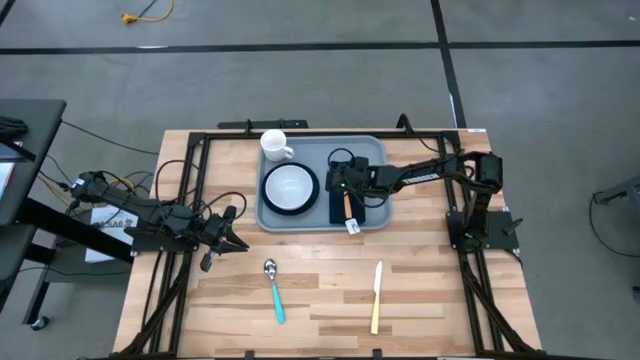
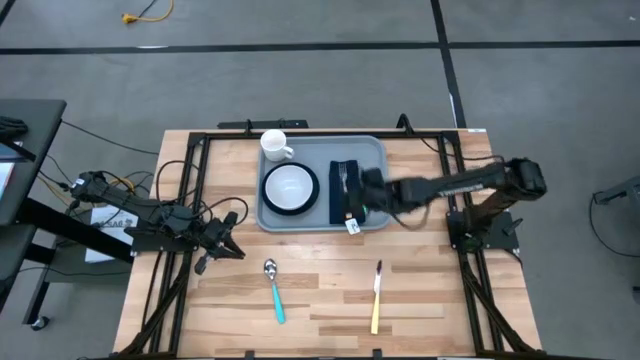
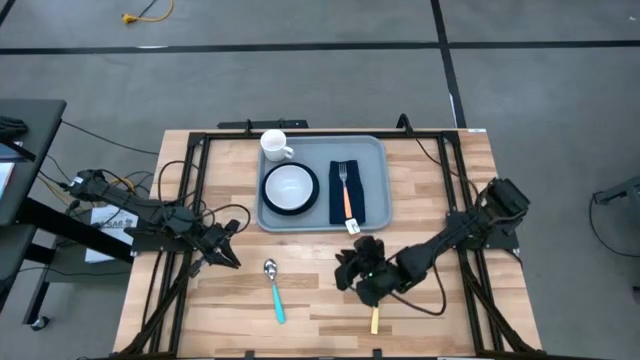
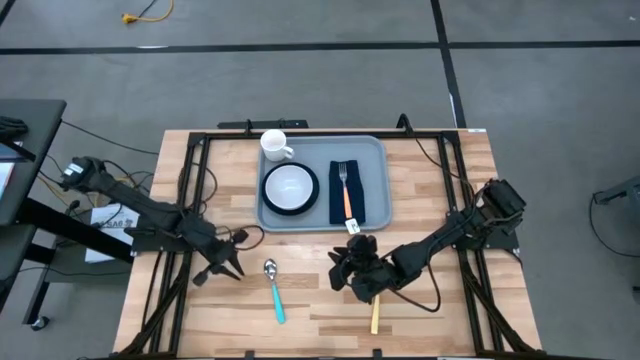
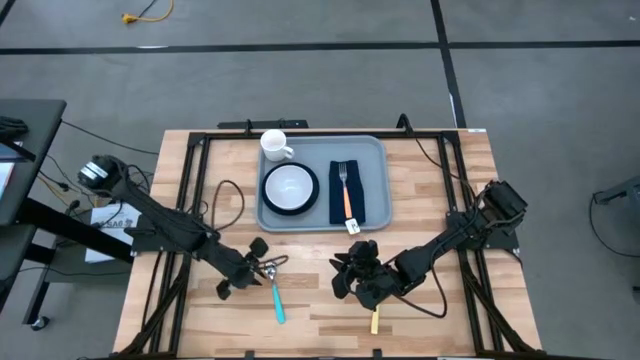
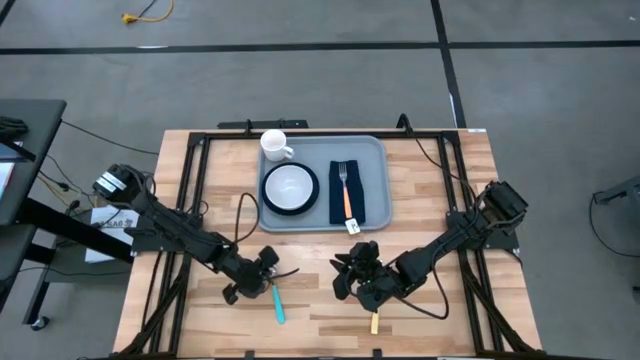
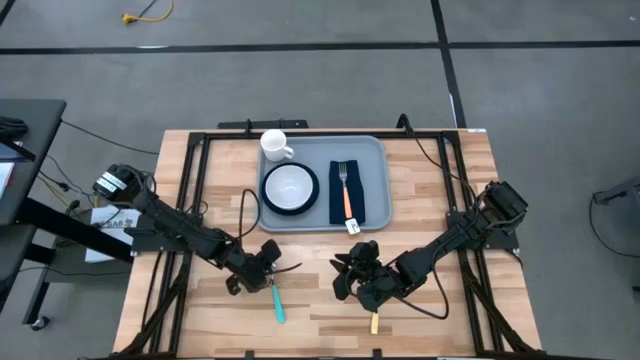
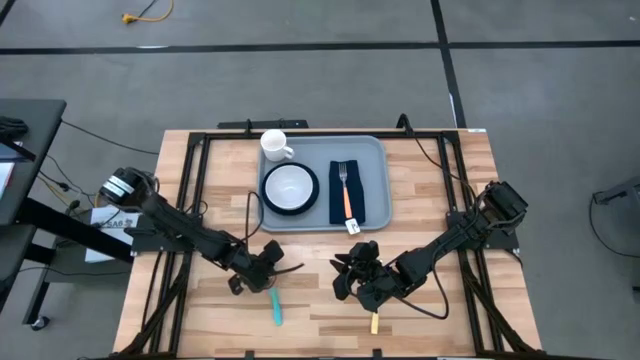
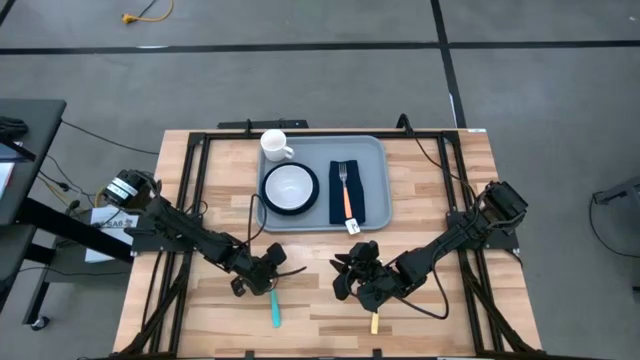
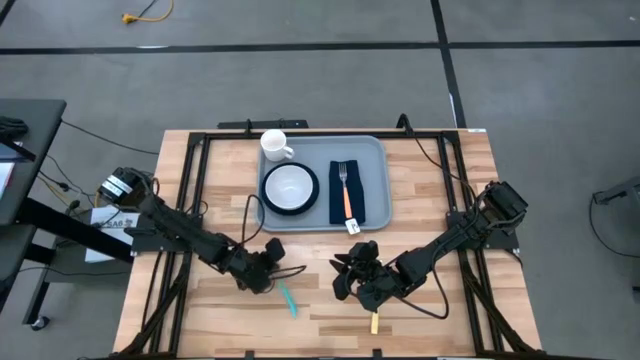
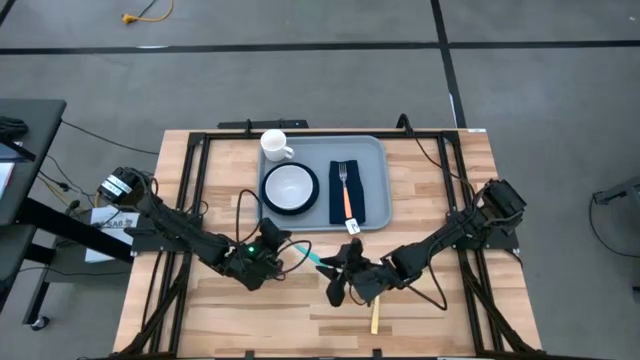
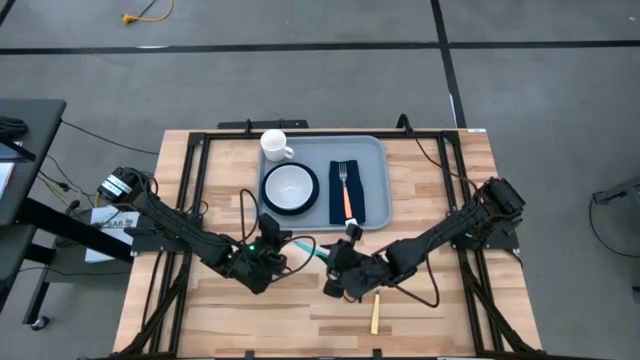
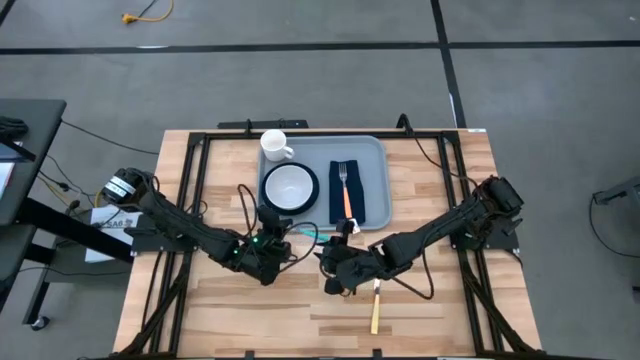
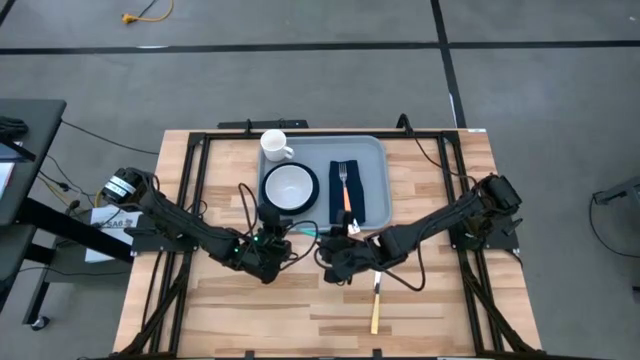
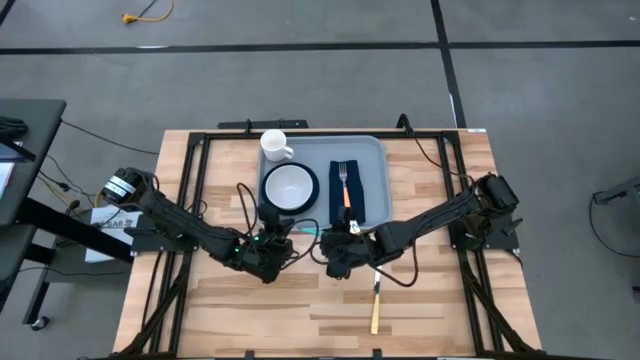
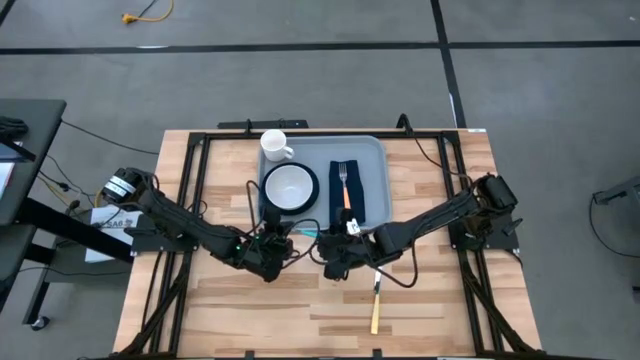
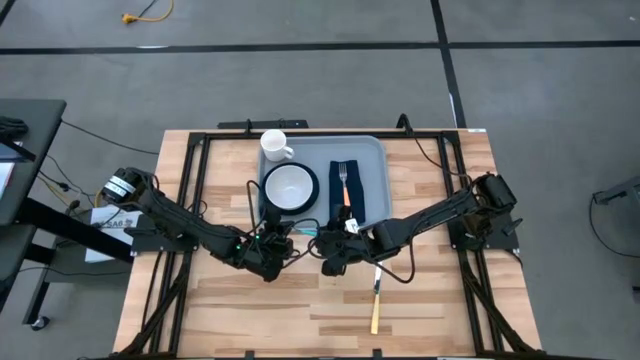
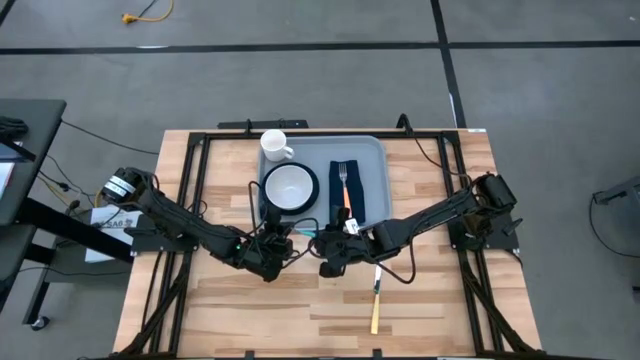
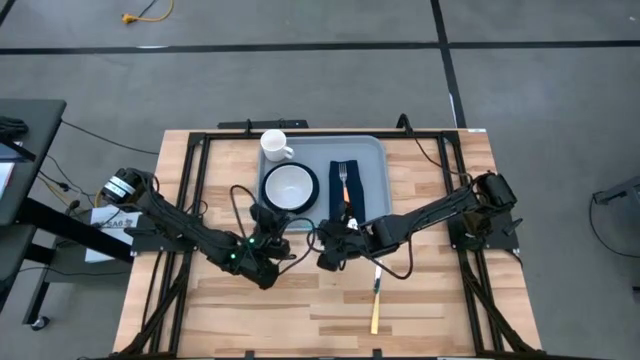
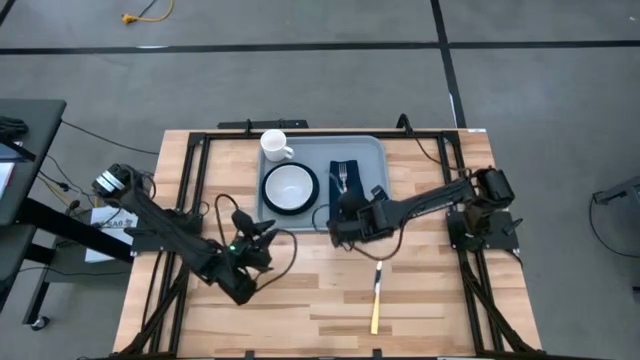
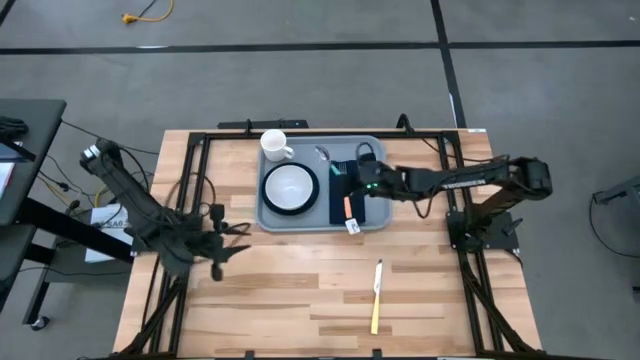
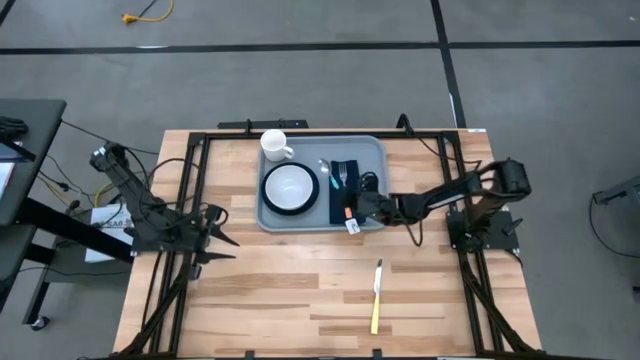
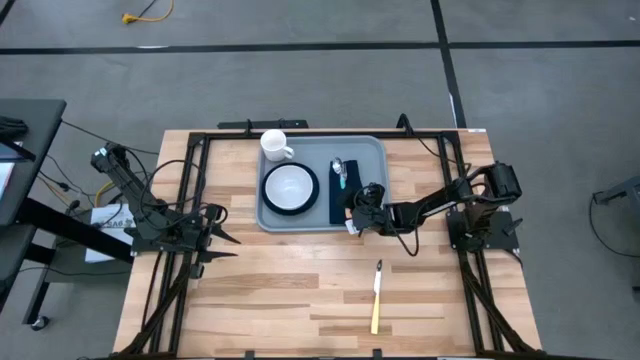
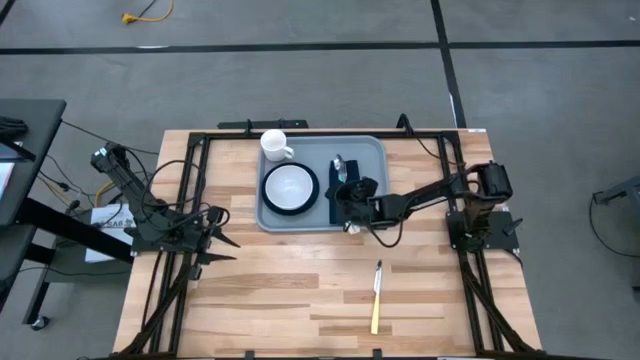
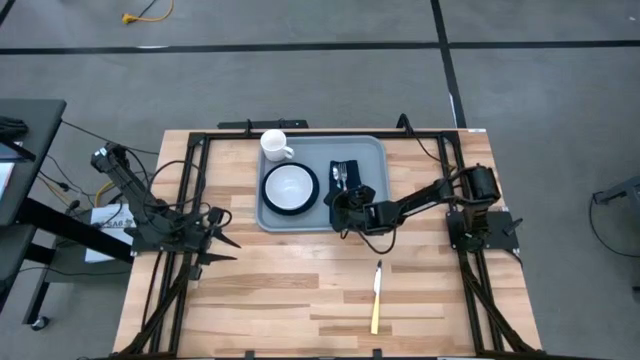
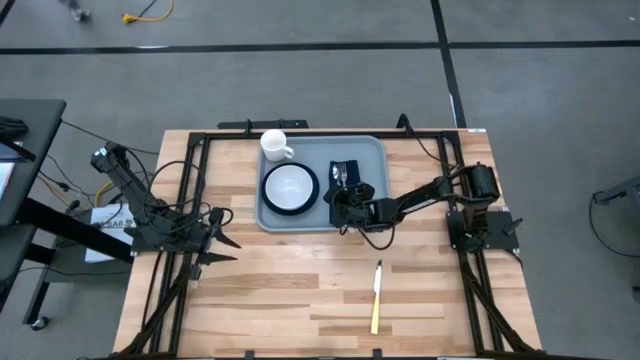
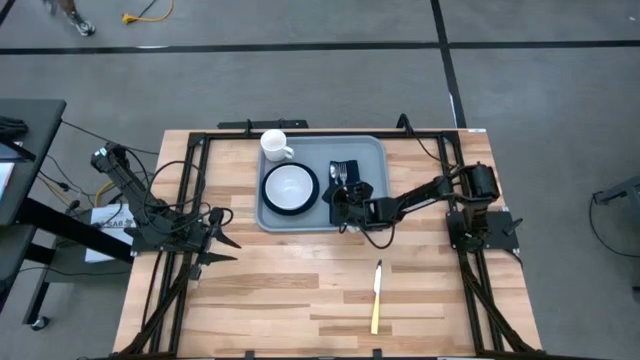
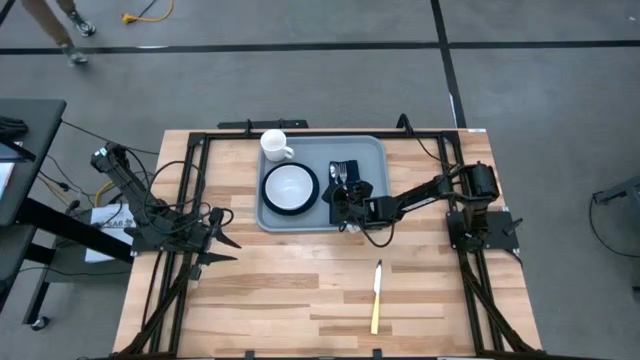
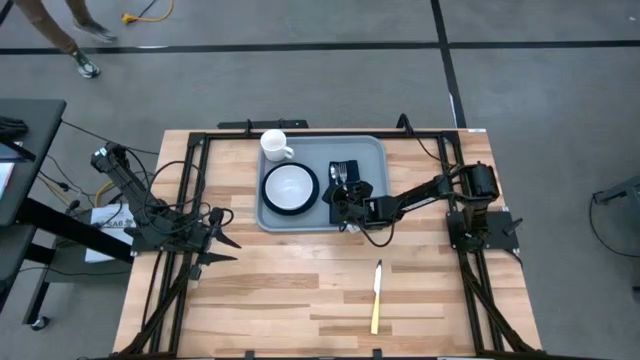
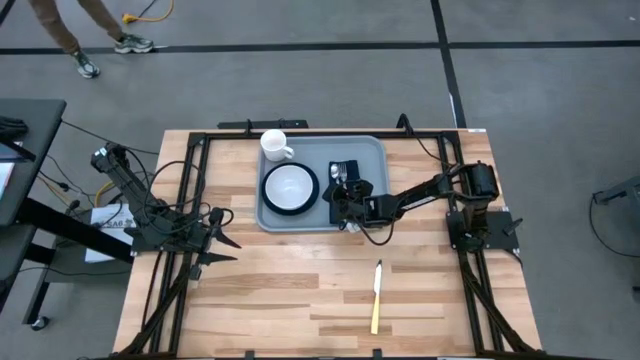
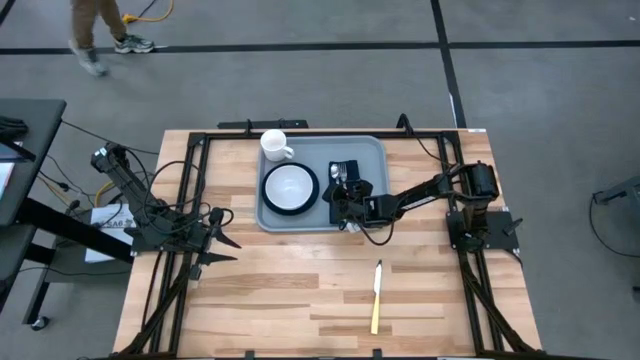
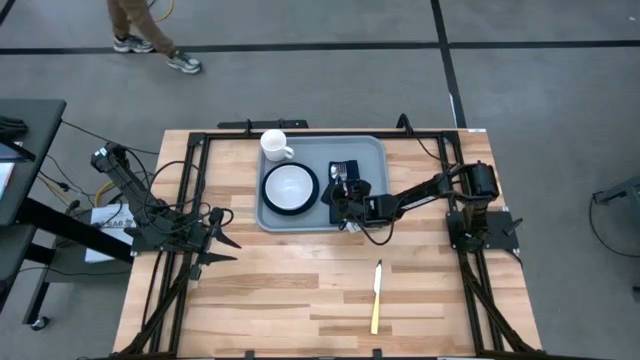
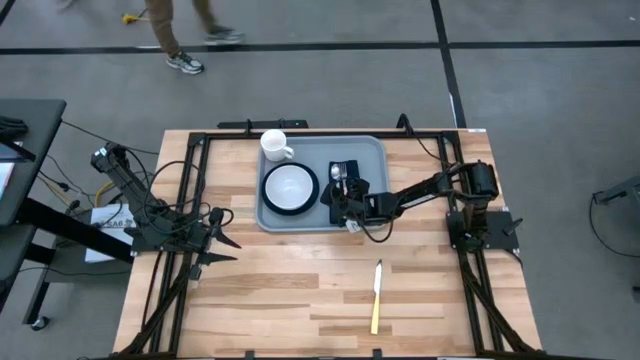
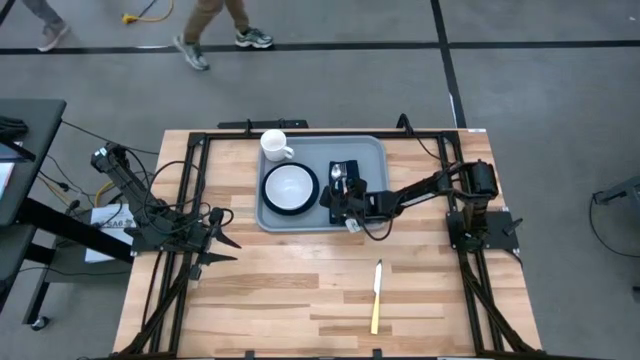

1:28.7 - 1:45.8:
Task: Set up tray
Put the light blue spoon on the dark blue table napkin to the left of the orange fork

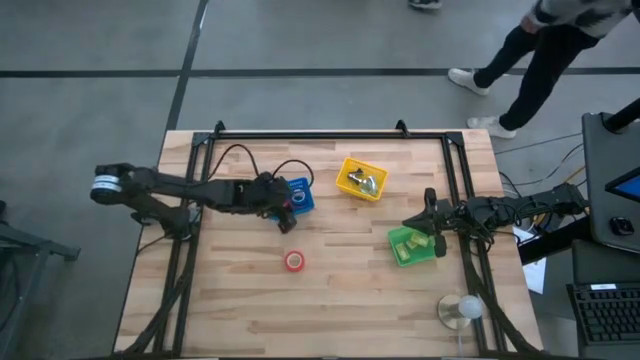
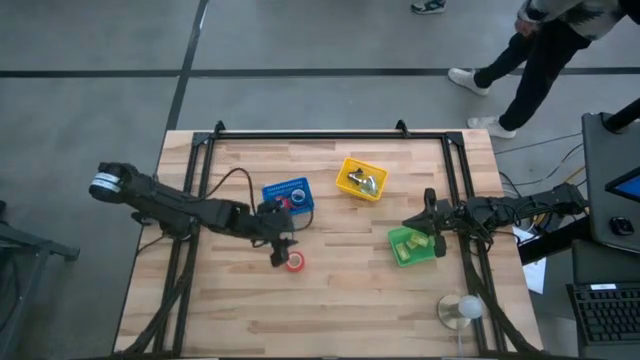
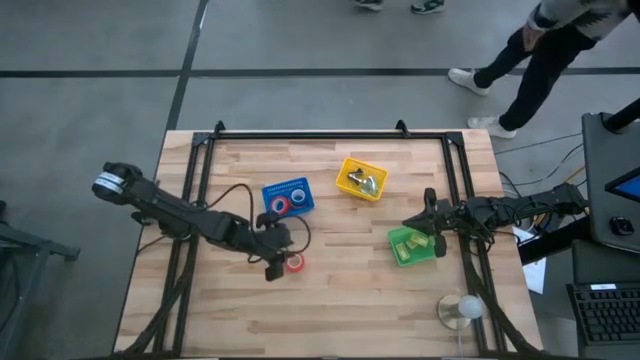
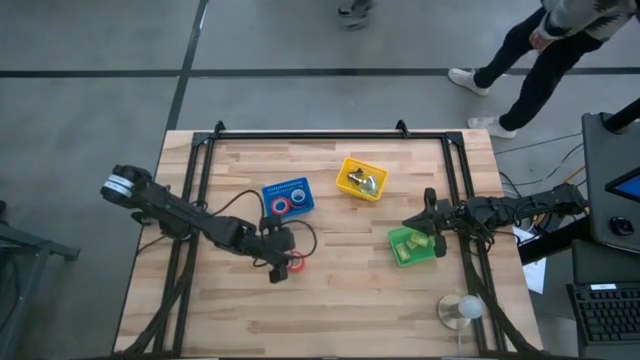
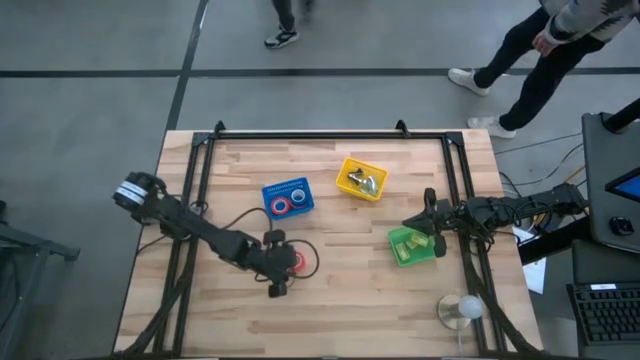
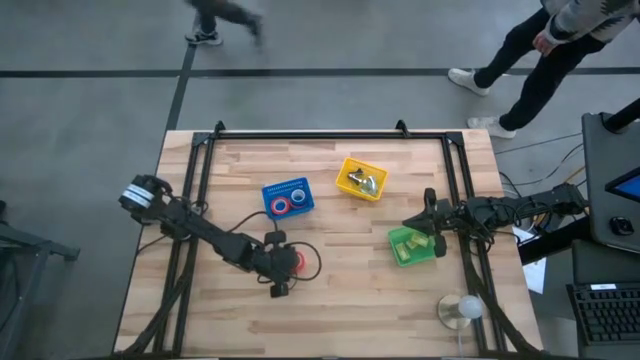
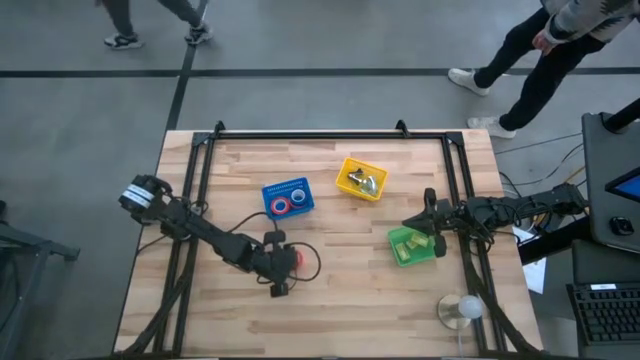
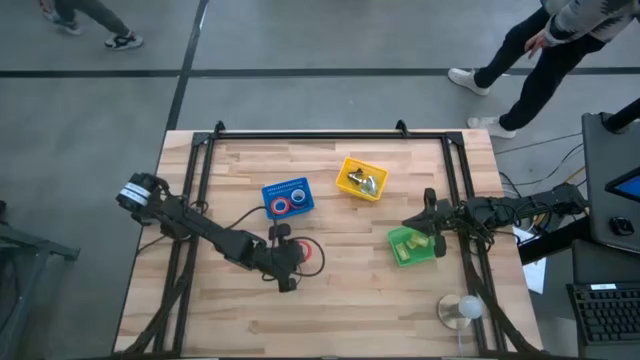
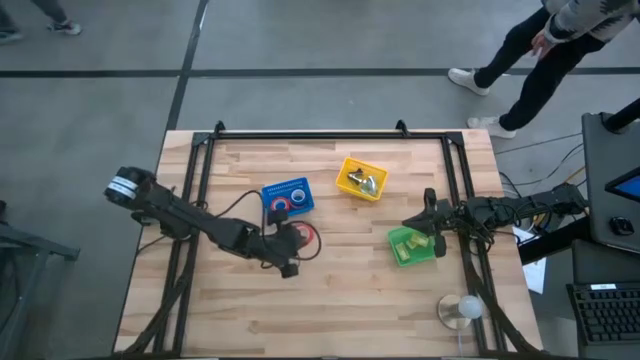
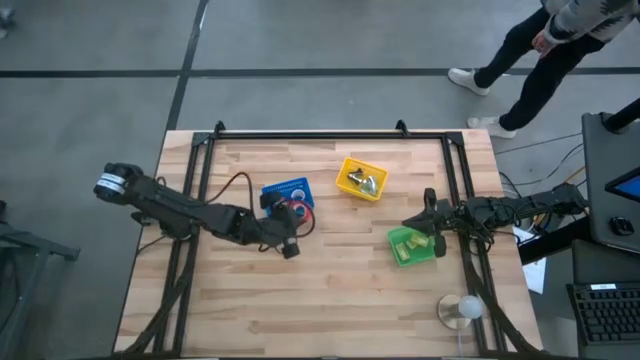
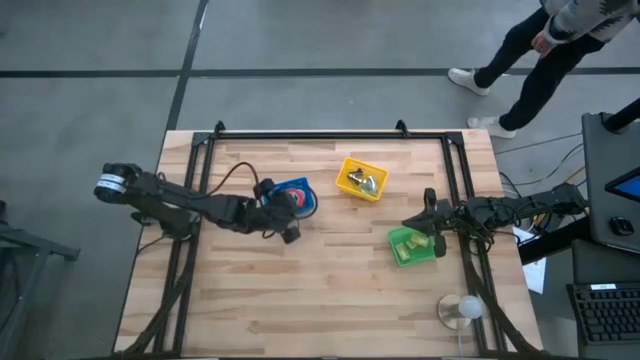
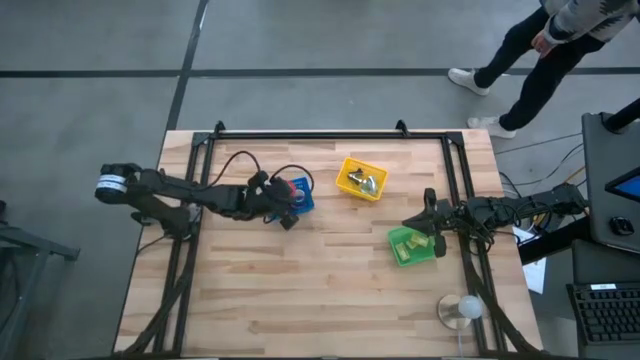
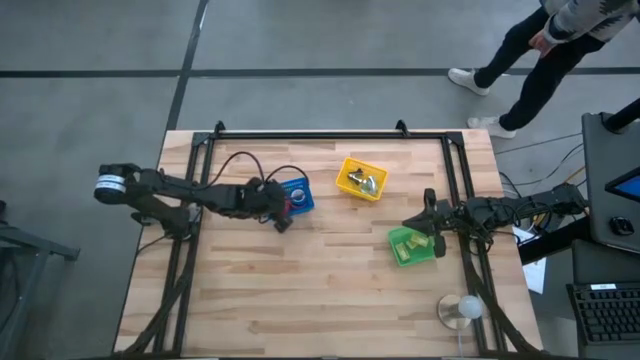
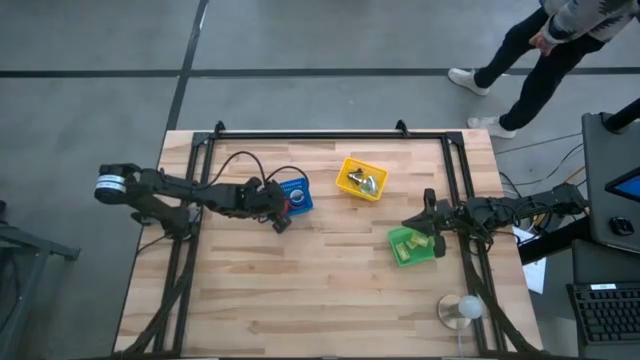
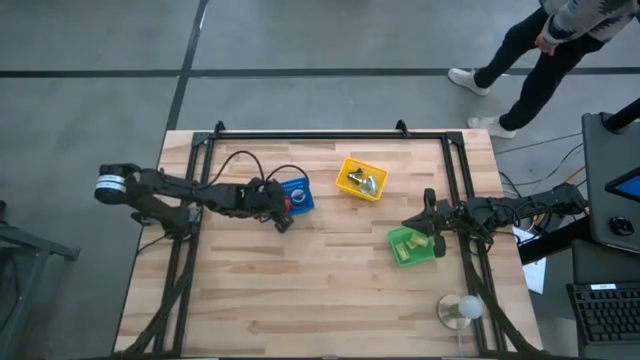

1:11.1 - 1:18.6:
Task: Pick and place Stapler, Stapler remover, tape
Put the red tape into the blue bin
